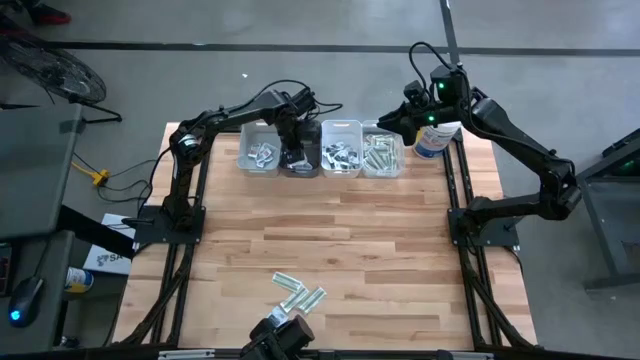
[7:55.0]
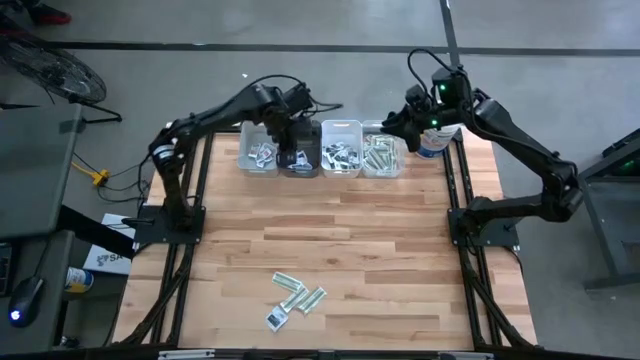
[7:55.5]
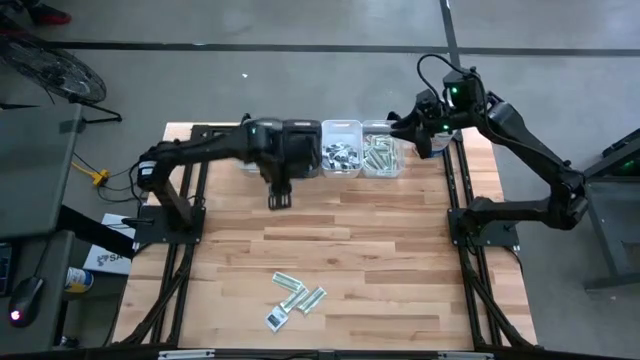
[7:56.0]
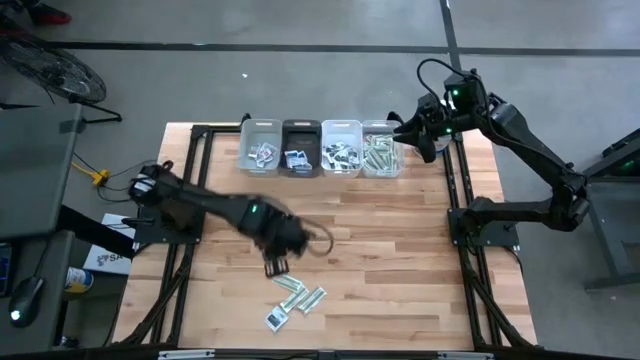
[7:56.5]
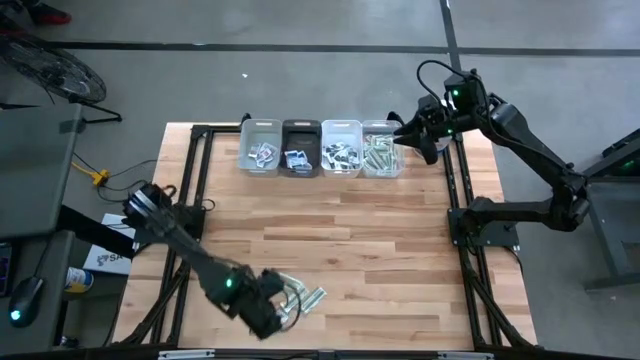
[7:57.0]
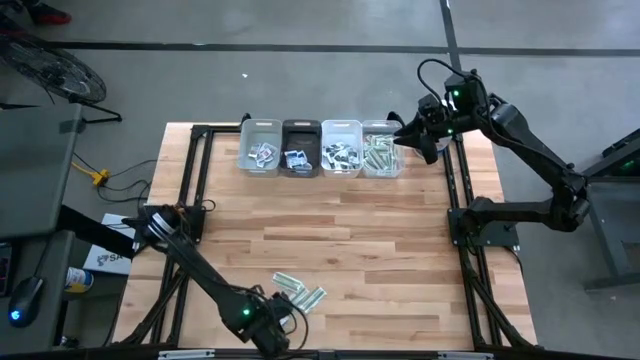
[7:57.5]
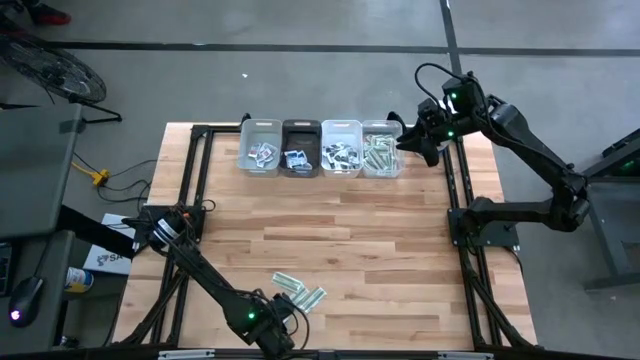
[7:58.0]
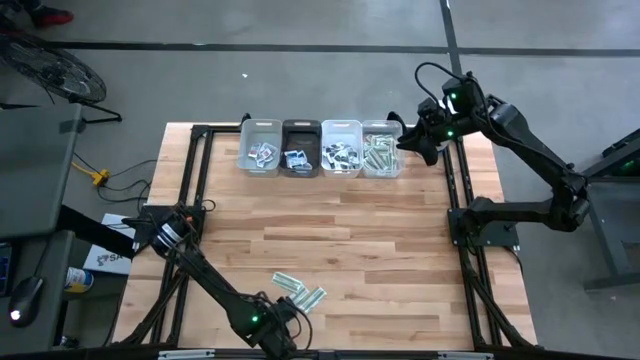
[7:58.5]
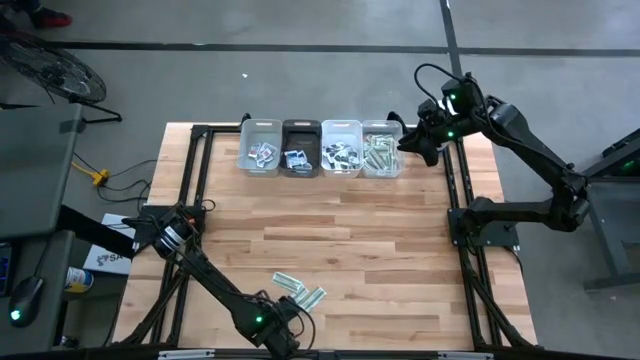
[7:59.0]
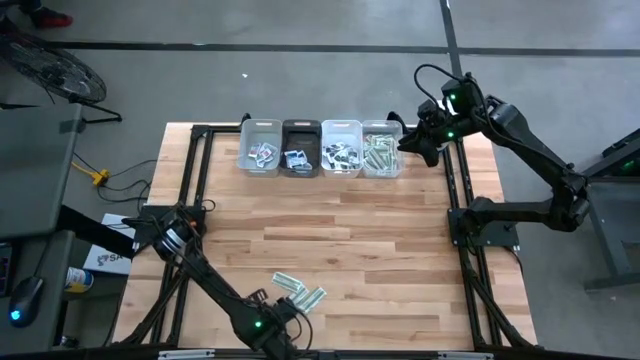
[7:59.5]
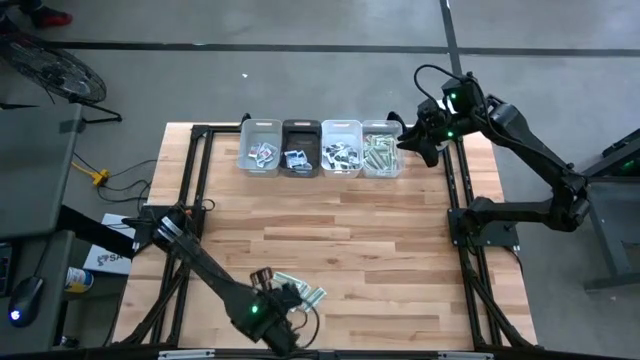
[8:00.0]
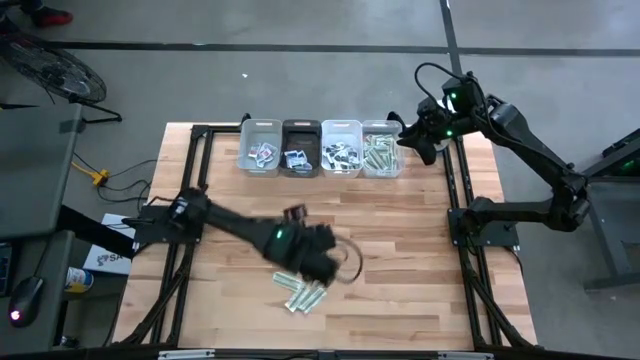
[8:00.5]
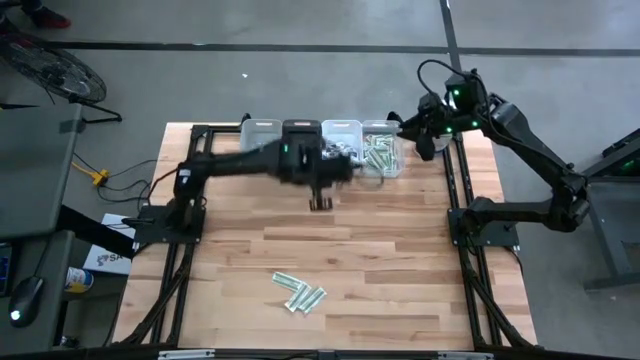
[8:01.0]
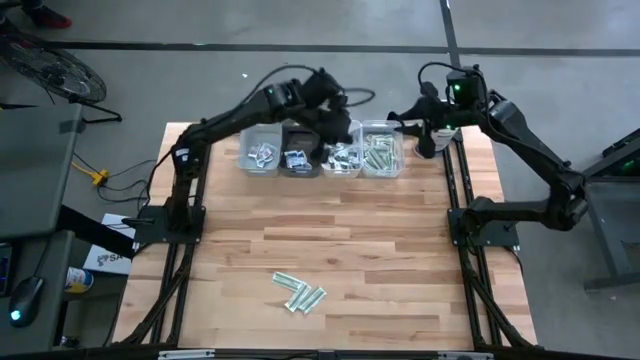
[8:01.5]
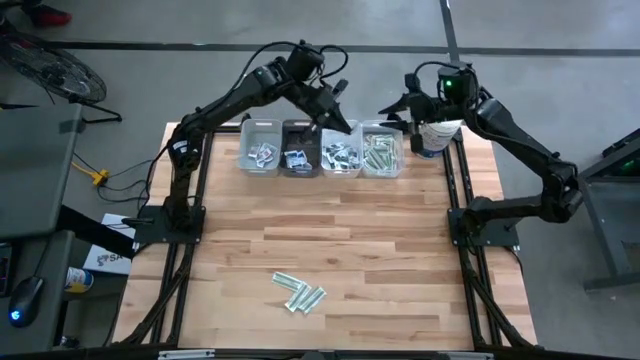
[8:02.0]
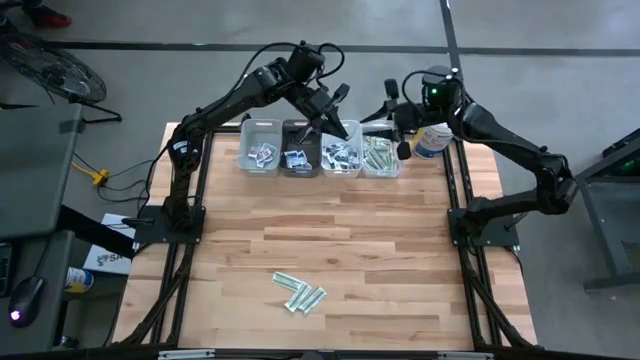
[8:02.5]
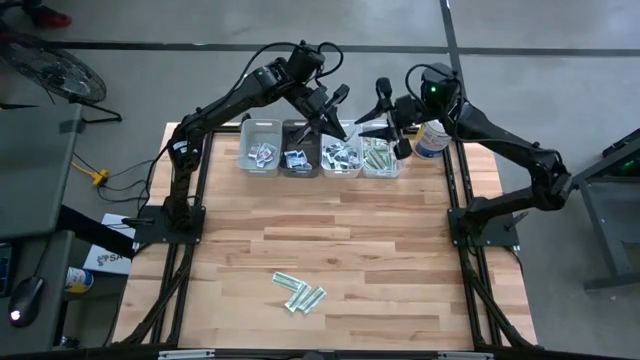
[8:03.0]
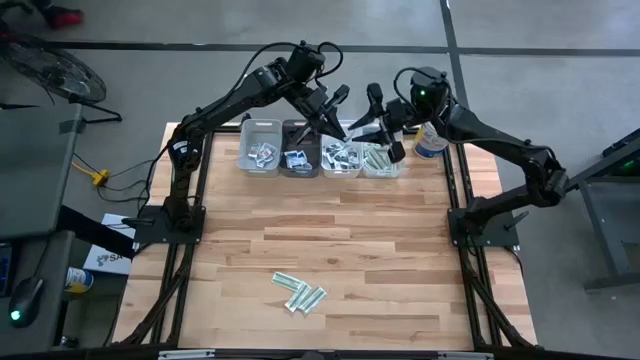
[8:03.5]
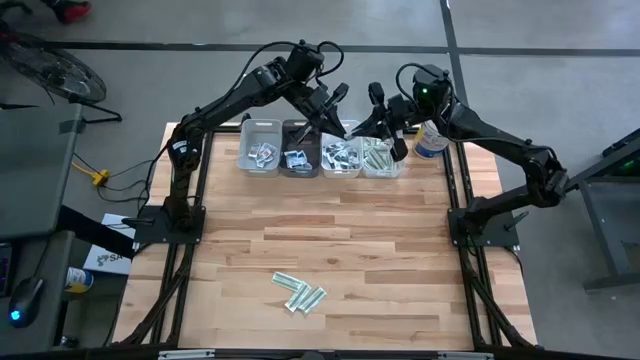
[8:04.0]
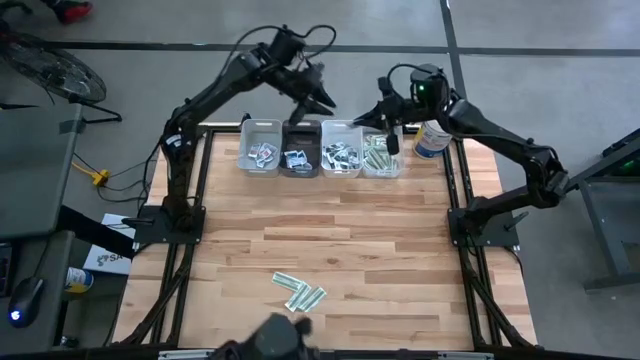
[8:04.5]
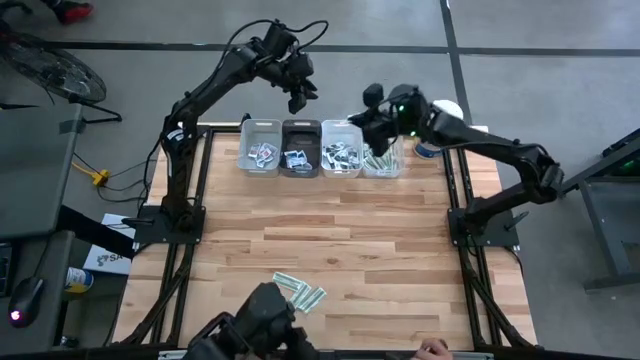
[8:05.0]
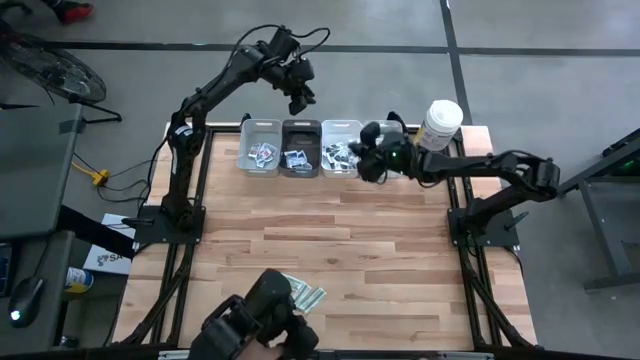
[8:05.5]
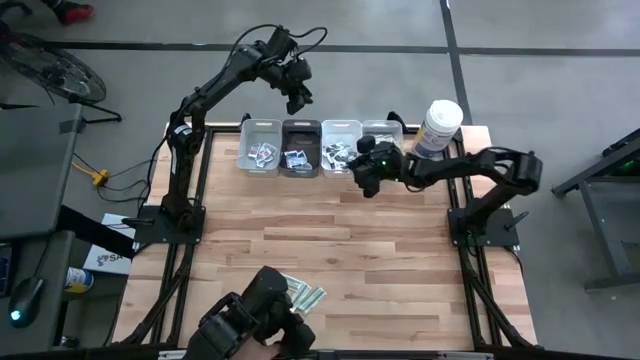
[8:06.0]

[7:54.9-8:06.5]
Task: Pick & Place First Aid Supplies
Put the black towelette pack into the white bin

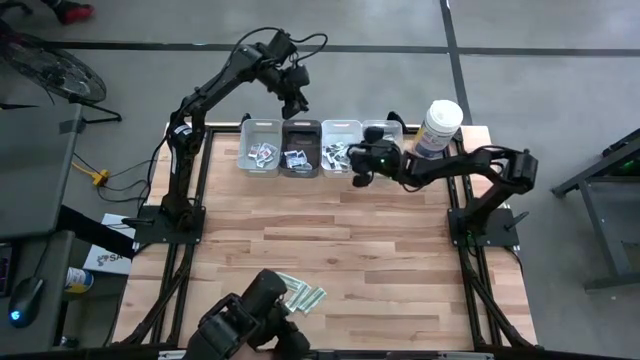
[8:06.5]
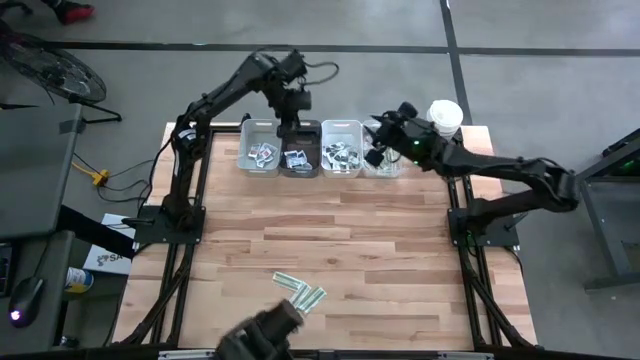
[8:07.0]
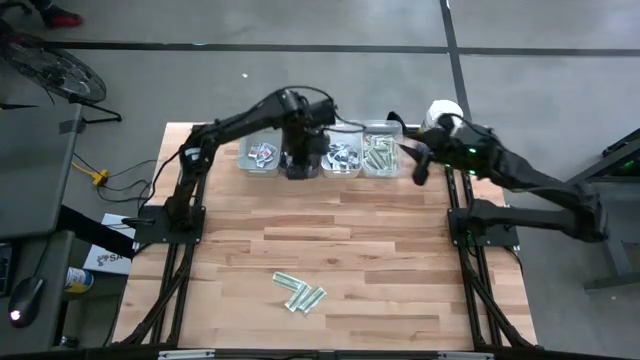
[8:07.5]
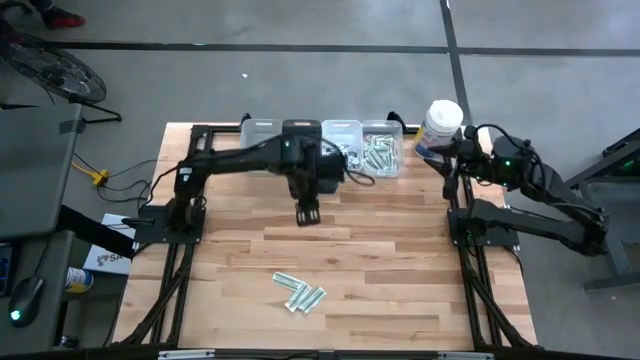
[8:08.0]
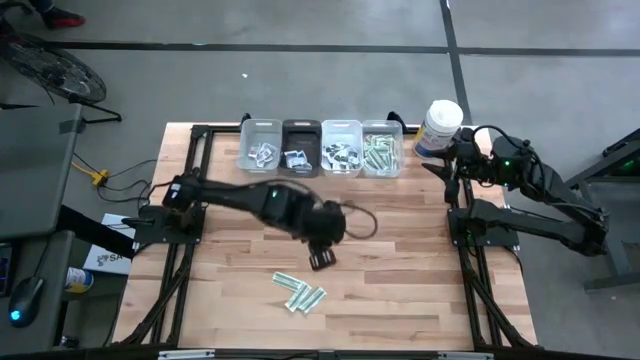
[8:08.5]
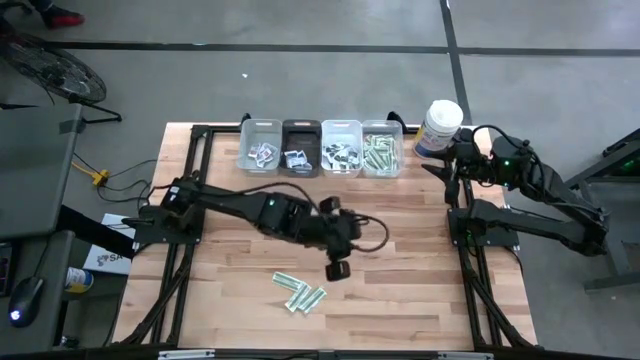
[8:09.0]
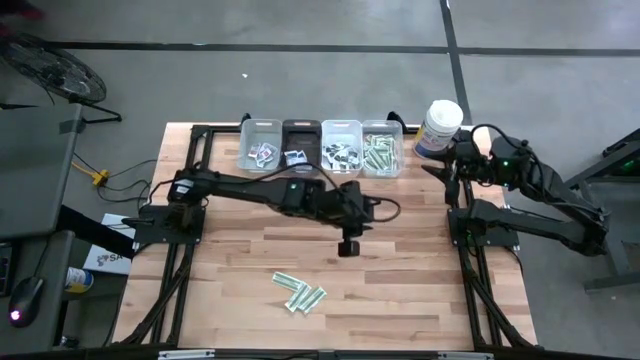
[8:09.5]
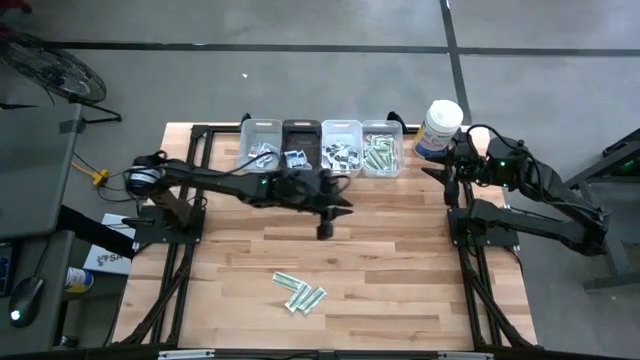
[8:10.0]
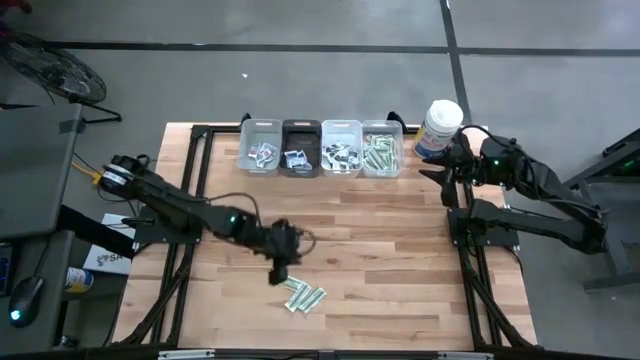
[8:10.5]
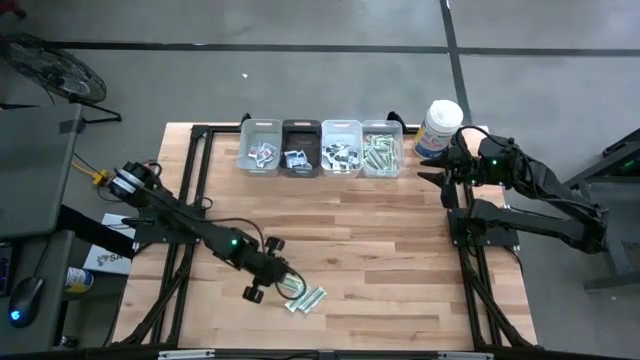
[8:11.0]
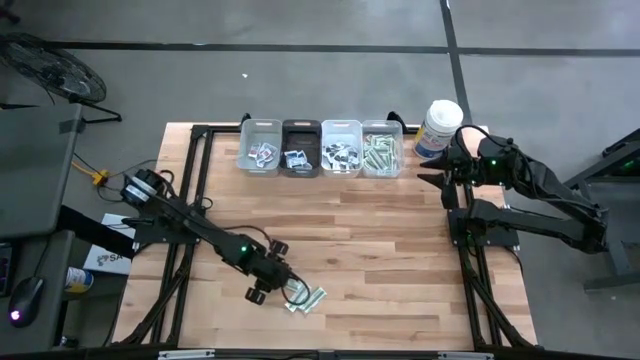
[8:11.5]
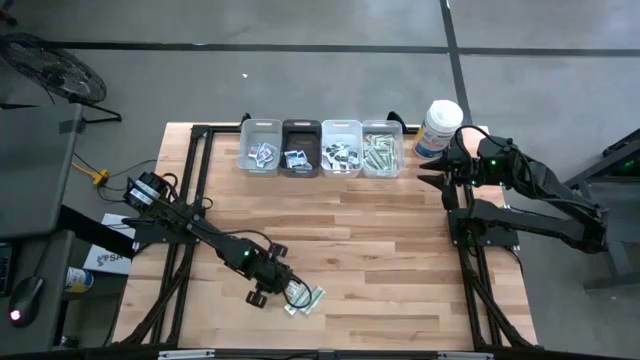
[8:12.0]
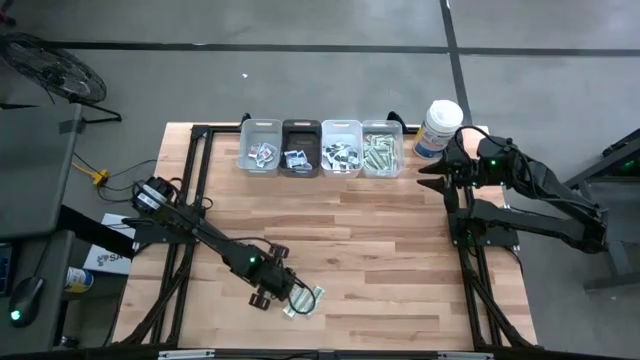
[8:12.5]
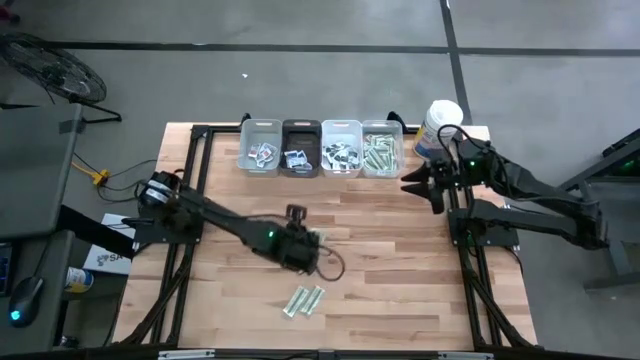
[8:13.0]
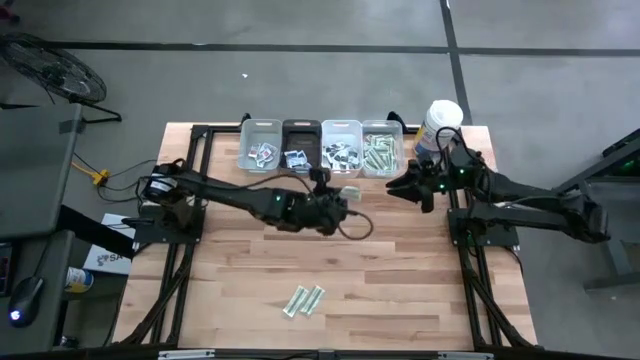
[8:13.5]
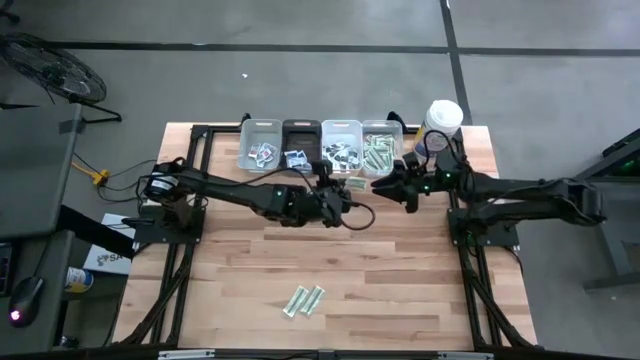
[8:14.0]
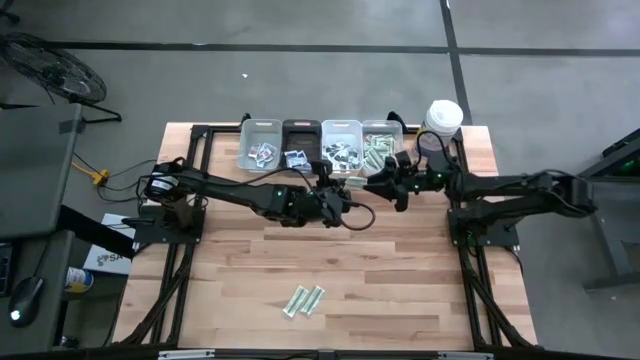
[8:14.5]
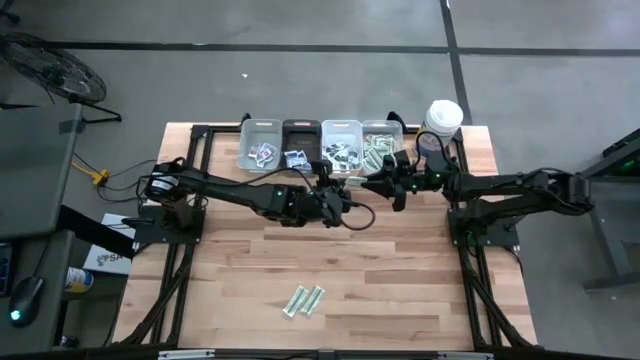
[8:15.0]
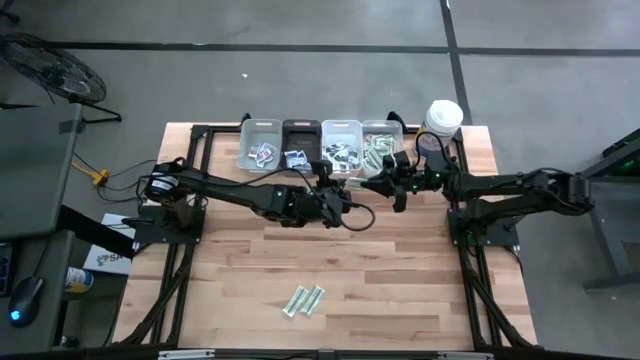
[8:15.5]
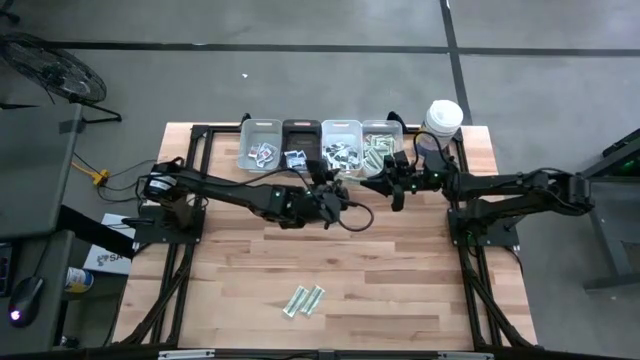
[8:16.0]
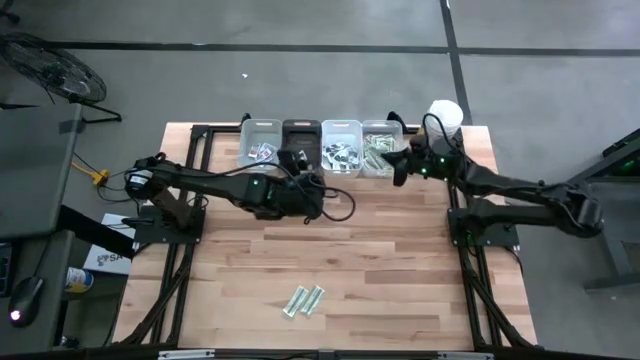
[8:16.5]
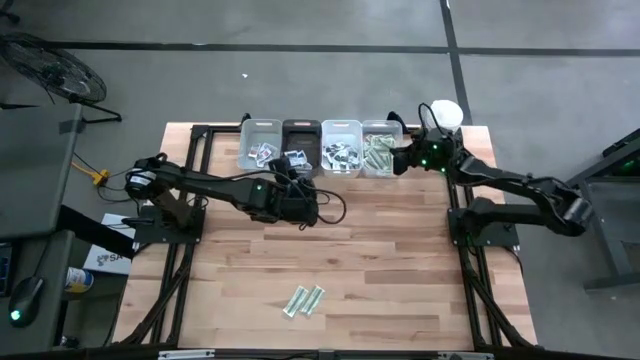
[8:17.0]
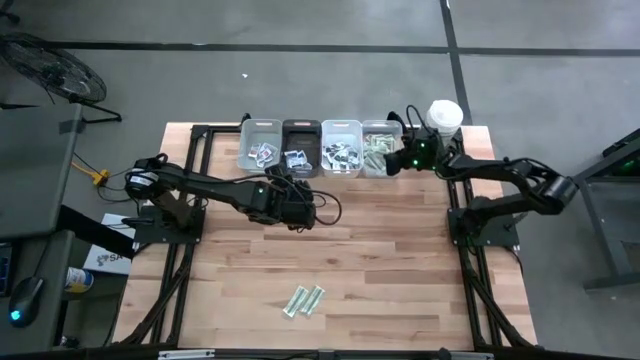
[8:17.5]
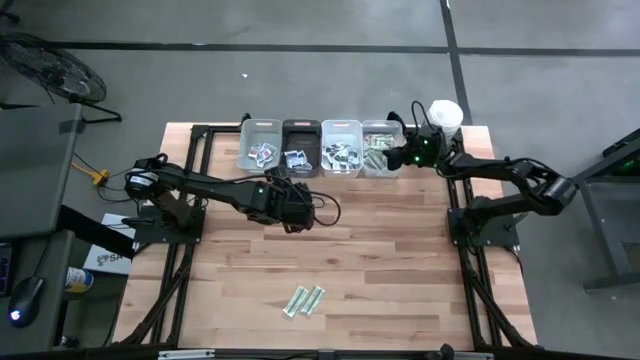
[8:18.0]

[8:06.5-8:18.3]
Put the green bandage into the transparent bin
